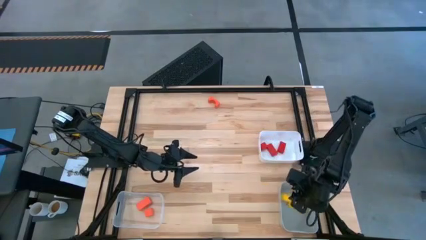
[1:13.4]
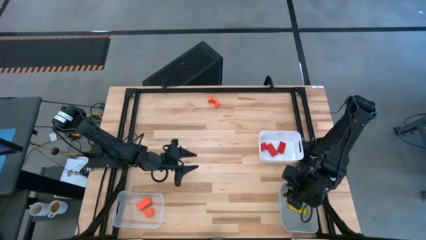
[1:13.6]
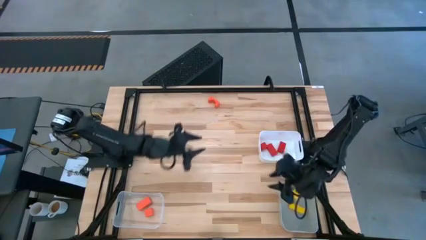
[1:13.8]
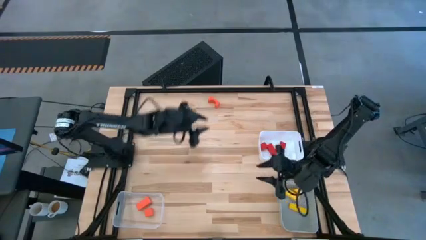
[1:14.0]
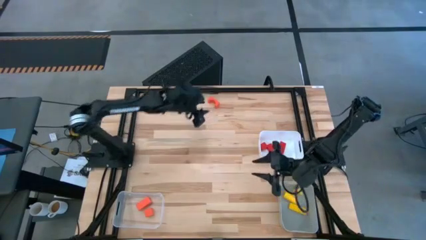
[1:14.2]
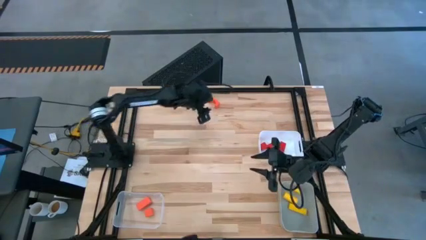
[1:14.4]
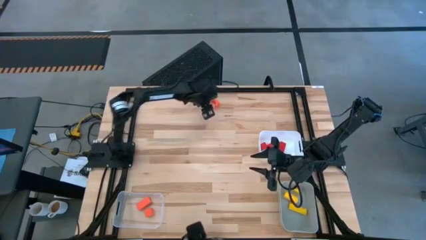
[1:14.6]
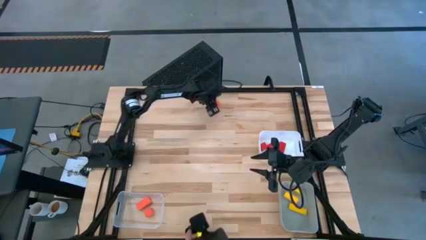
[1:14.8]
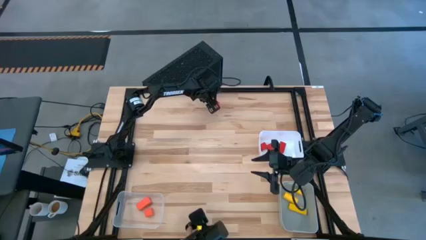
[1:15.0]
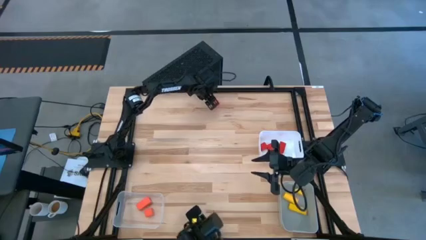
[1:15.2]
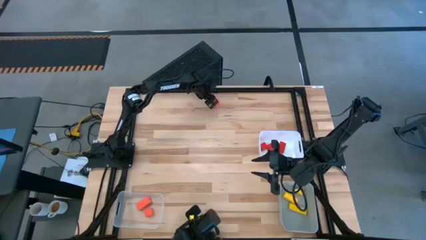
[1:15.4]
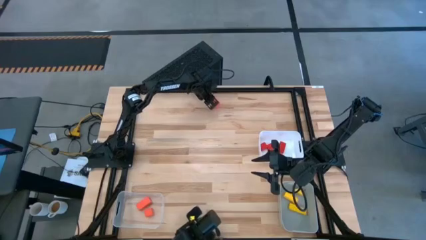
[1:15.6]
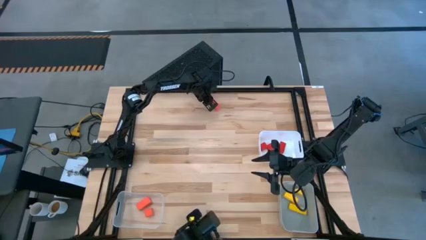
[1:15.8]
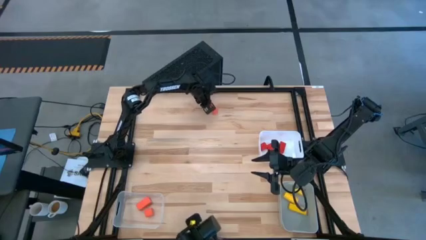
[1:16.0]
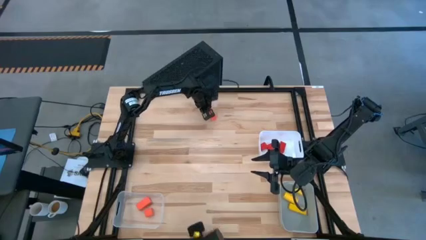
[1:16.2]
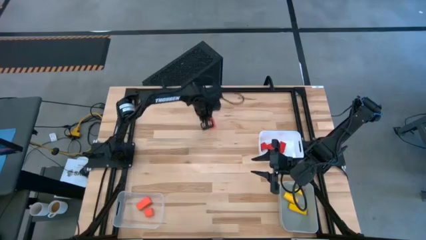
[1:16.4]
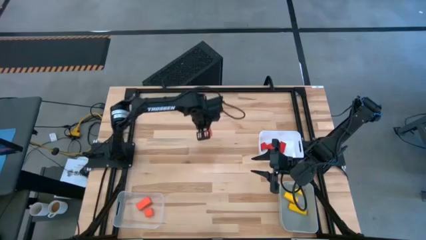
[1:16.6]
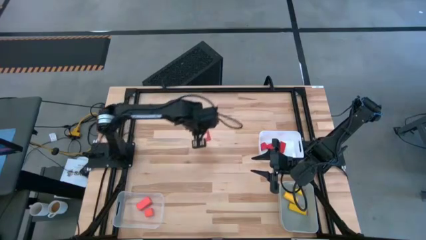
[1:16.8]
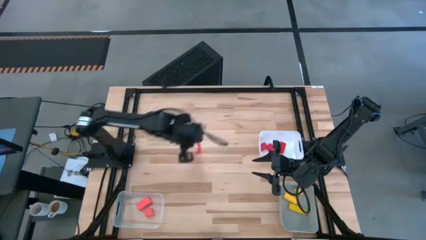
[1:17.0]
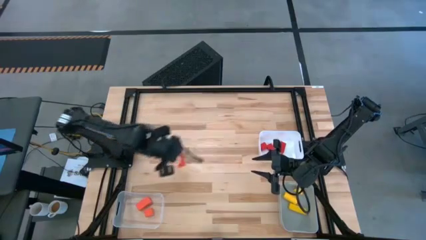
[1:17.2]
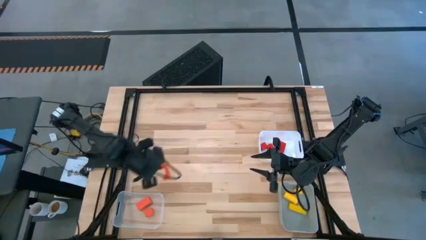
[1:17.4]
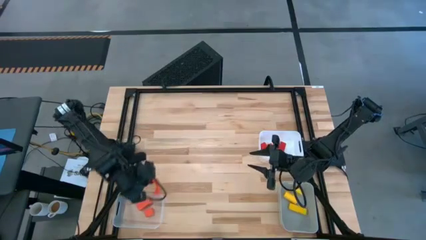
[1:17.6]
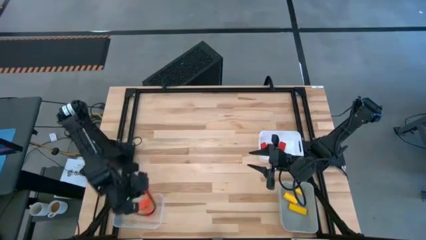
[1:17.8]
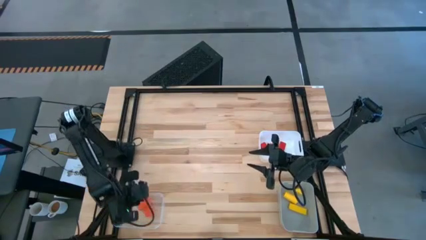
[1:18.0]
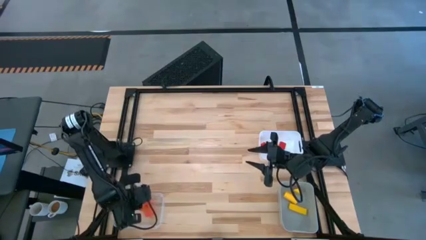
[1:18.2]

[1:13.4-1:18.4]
Task: Sort & place blocks by color
Put the orange block into the transparent bin

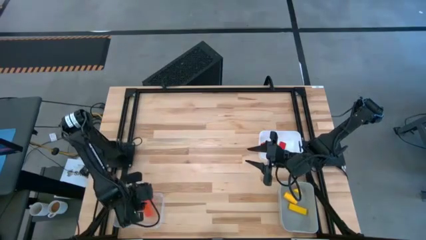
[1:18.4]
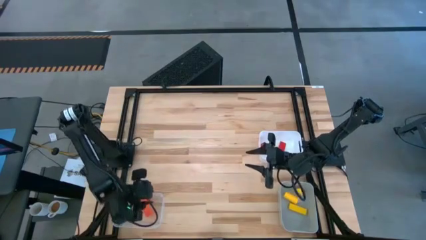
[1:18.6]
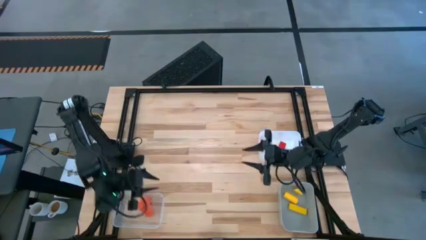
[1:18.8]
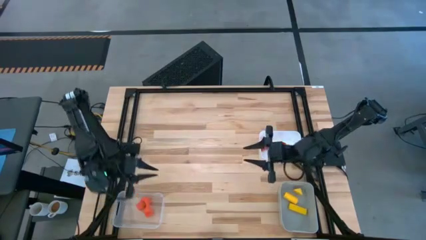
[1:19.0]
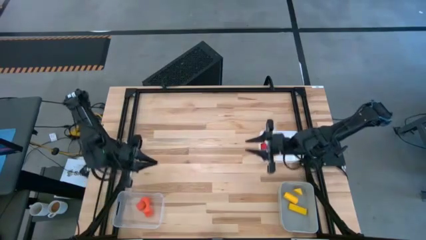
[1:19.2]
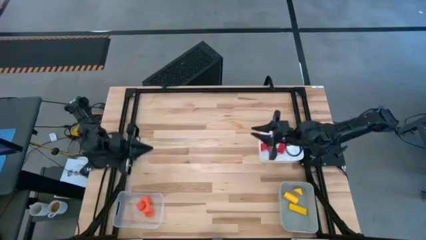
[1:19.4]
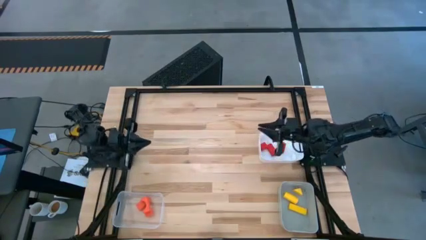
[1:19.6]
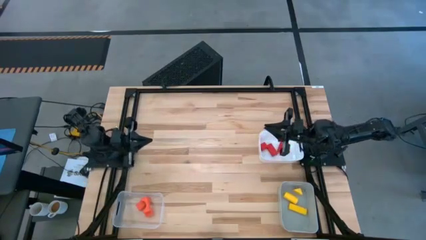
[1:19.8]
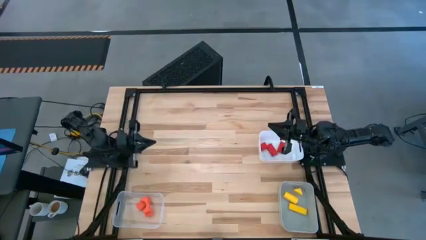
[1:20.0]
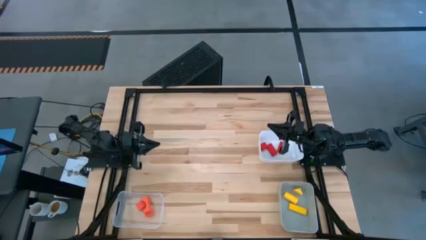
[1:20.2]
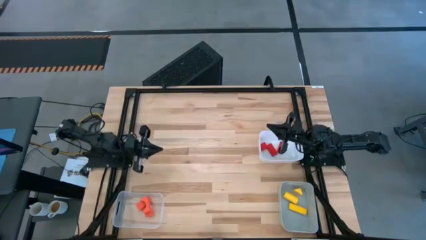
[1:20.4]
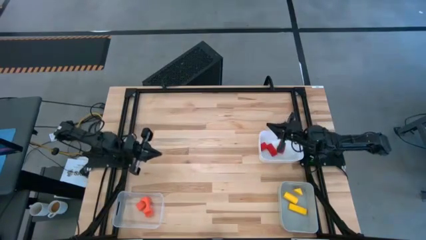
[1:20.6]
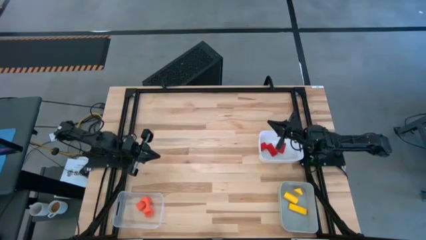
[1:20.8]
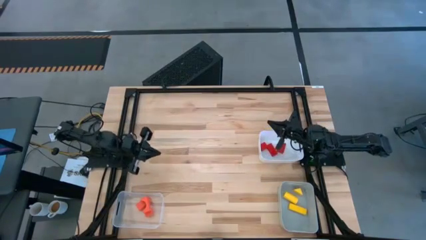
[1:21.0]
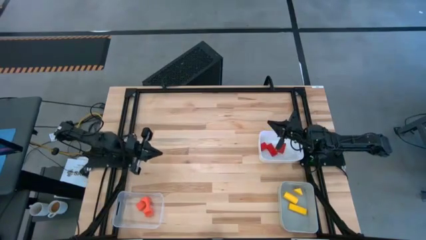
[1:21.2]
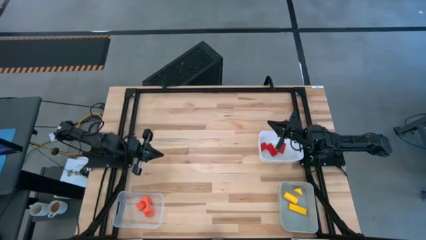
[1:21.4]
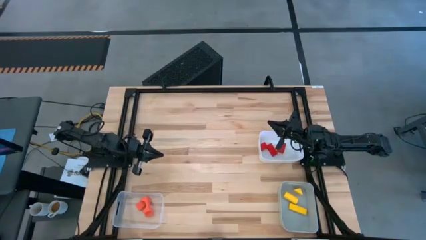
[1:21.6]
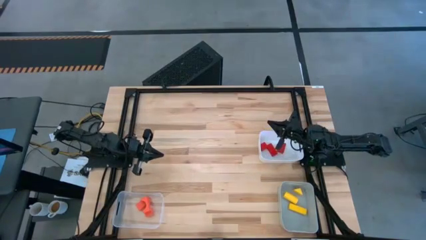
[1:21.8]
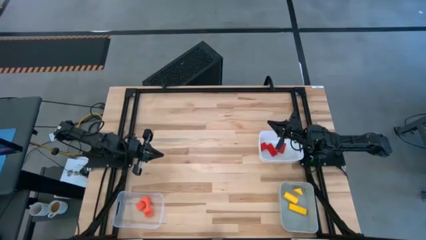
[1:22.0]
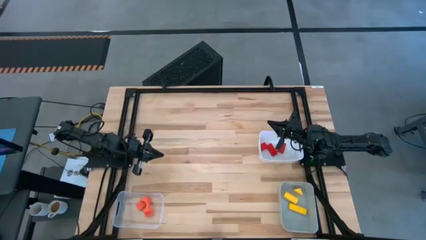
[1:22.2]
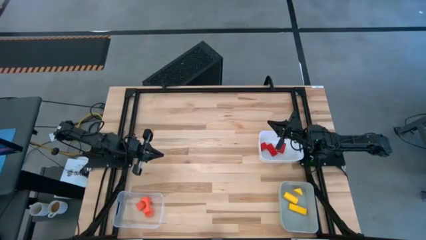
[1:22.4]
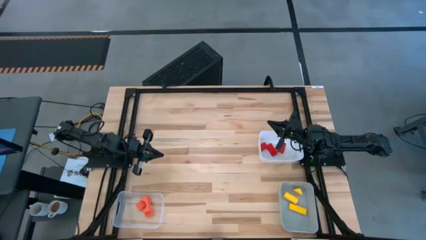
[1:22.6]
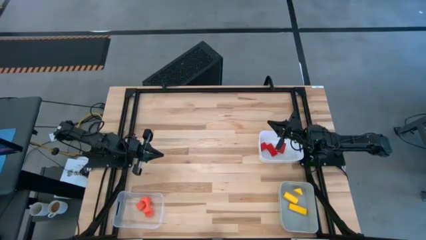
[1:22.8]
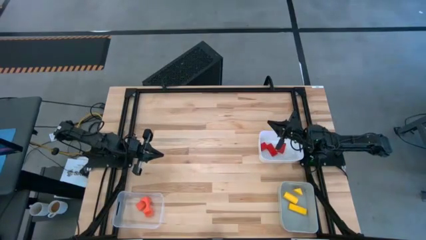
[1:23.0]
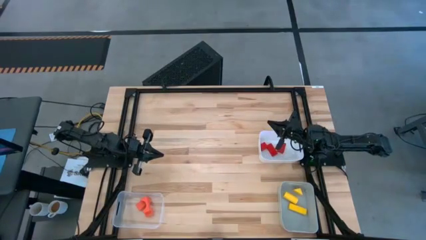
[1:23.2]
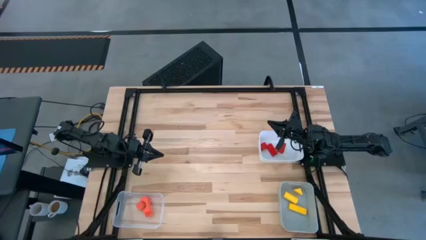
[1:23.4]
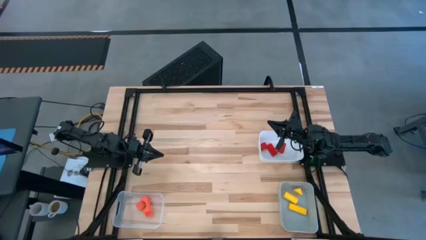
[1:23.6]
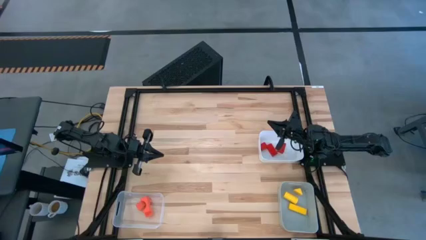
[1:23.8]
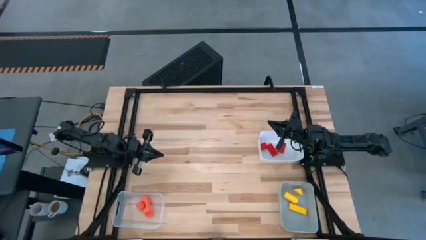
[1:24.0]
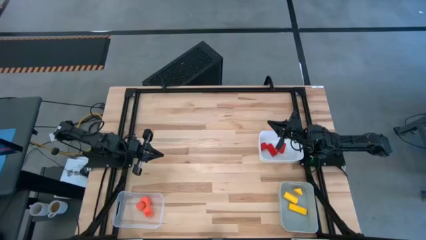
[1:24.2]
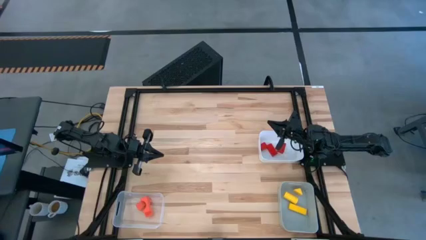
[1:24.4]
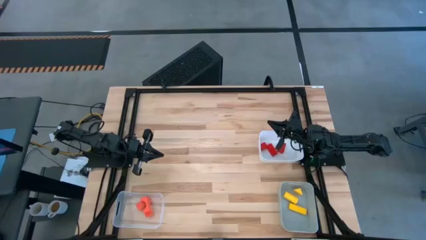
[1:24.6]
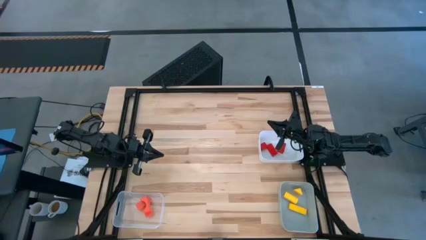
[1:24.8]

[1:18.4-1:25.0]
Return to Home Position

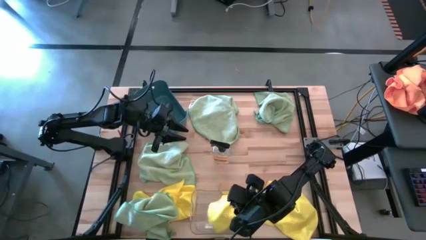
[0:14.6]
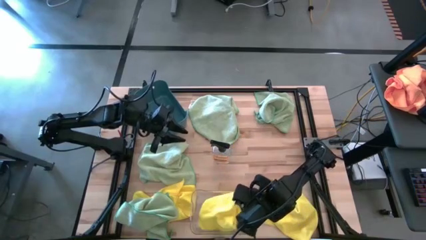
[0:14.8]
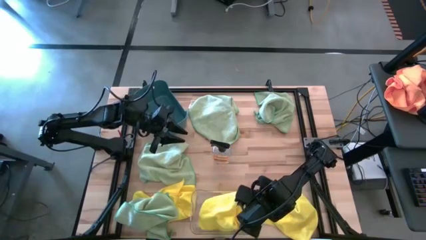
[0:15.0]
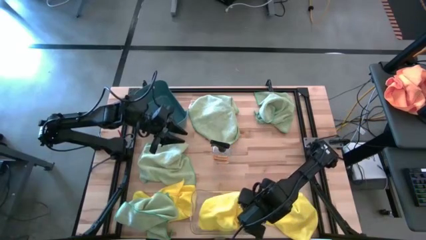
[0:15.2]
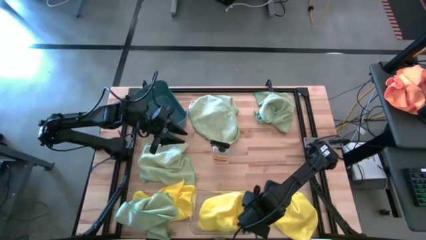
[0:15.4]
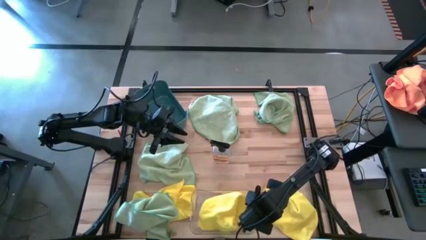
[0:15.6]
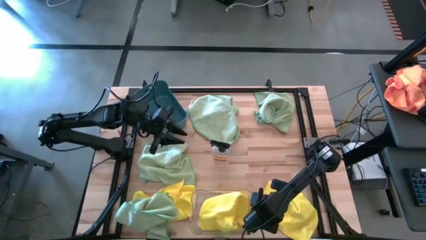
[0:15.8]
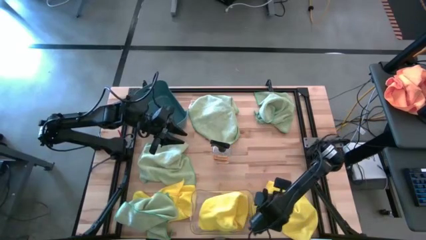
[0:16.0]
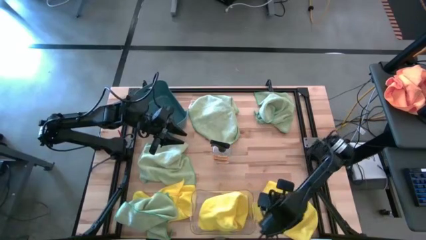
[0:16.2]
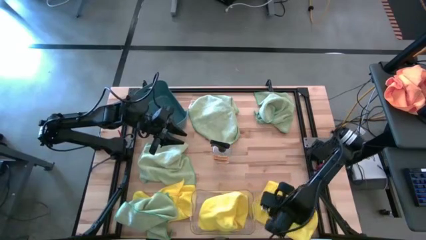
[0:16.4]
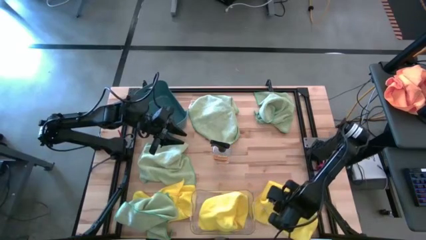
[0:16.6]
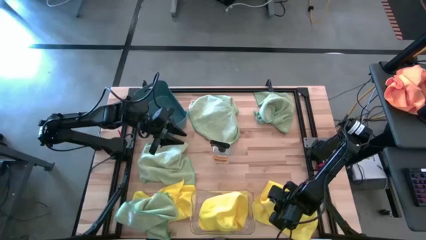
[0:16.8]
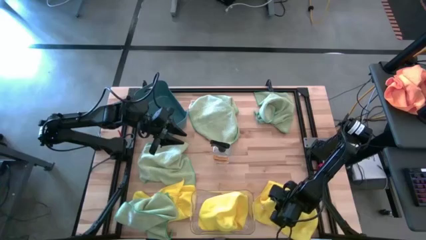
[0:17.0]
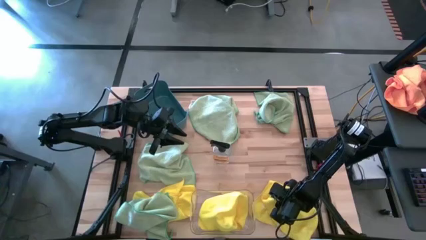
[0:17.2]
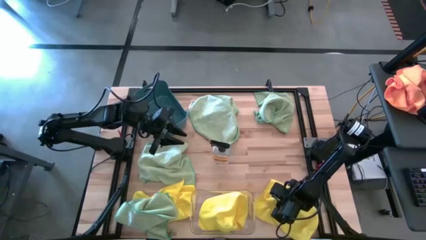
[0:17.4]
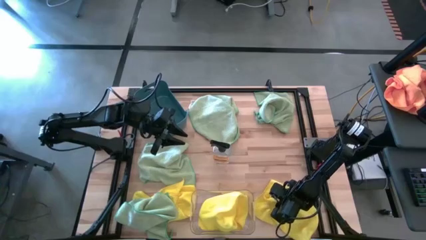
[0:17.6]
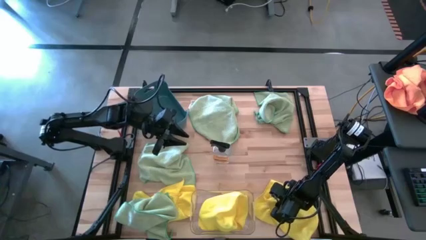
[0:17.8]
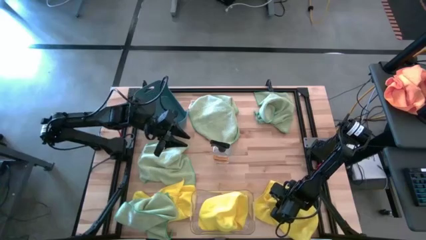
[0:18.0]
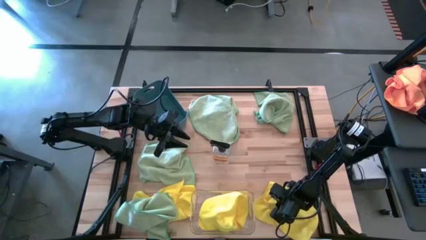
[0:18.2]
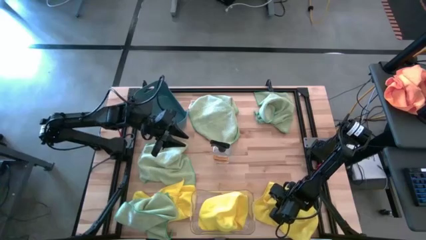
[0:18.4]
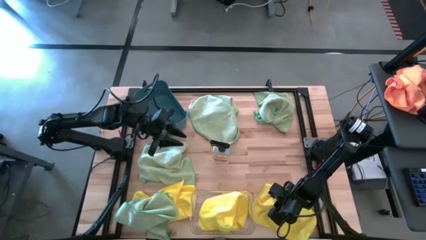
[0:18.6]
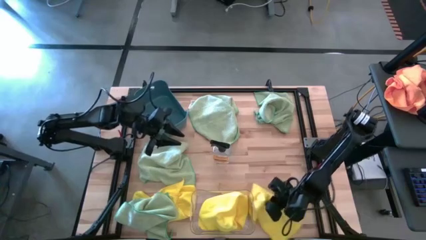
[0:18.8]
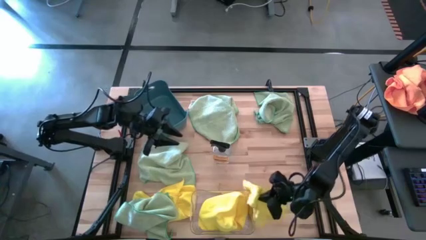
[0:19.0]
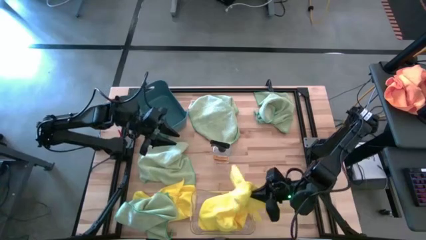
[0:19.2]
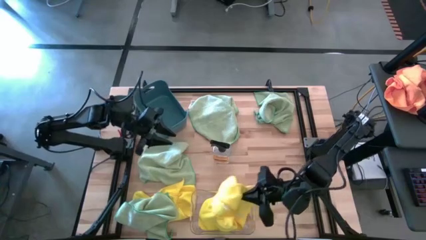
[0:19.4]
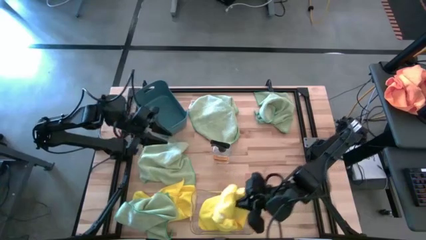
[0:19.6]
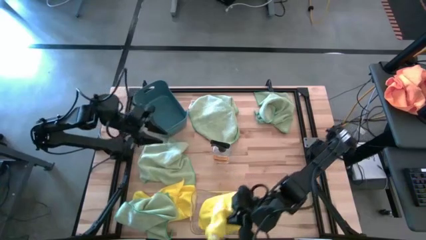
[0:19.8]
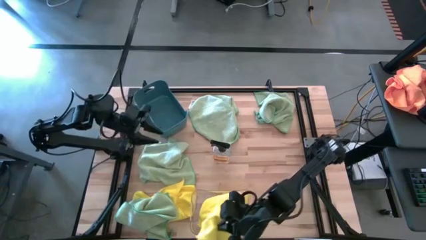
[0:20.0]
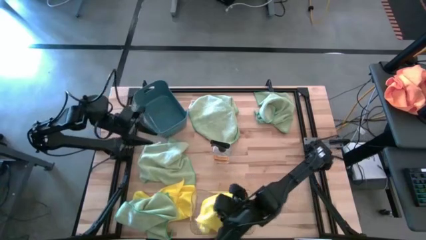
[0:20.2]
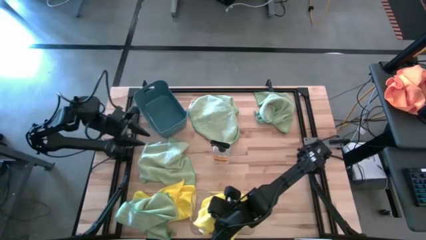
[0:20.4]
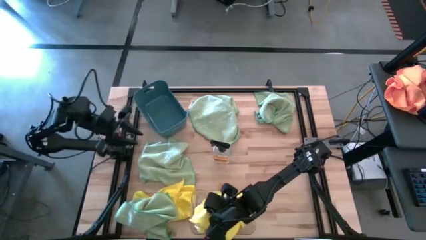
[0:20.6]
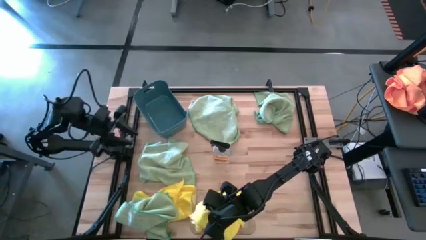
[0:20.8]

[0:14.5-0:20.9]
Task: Sort microfiber towel by color & place in baskets
Put the yellow towel into the transparent bin
